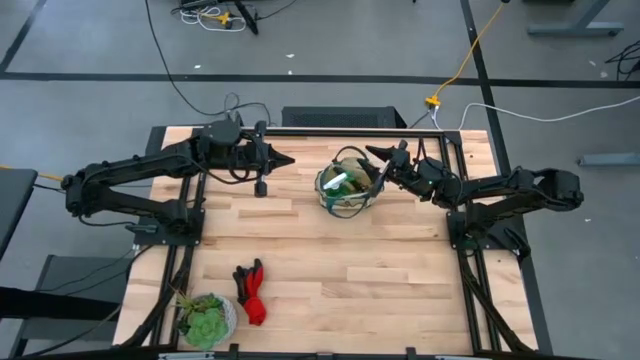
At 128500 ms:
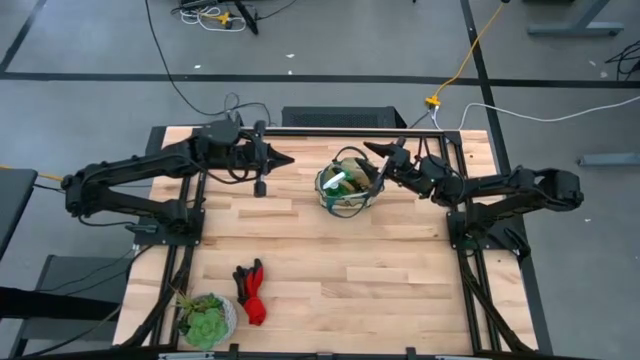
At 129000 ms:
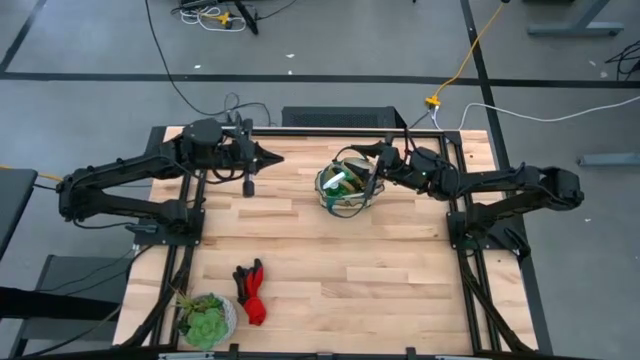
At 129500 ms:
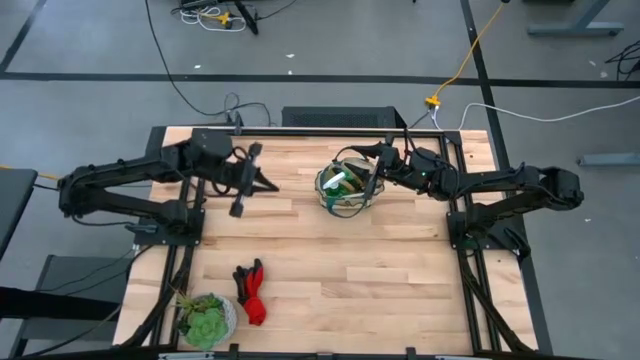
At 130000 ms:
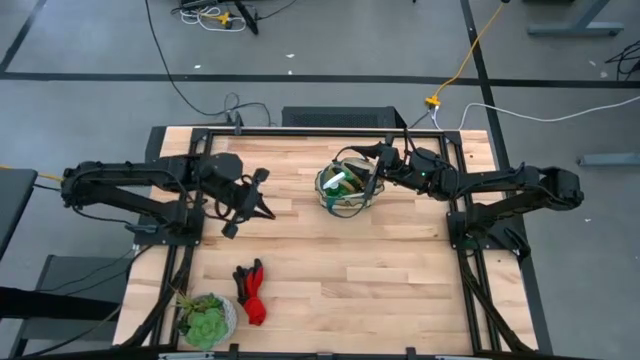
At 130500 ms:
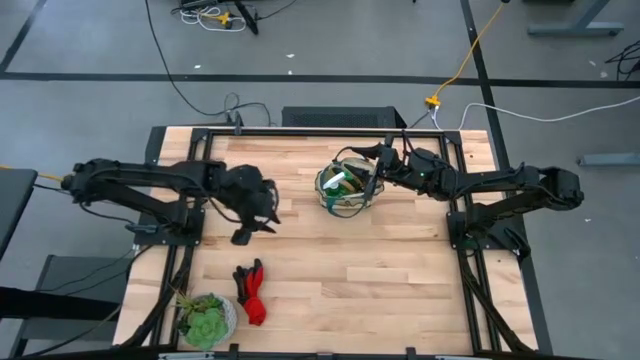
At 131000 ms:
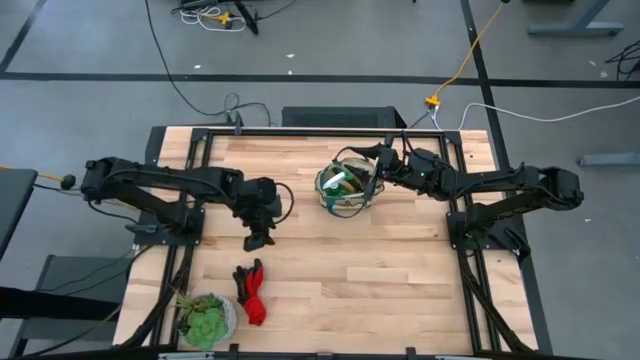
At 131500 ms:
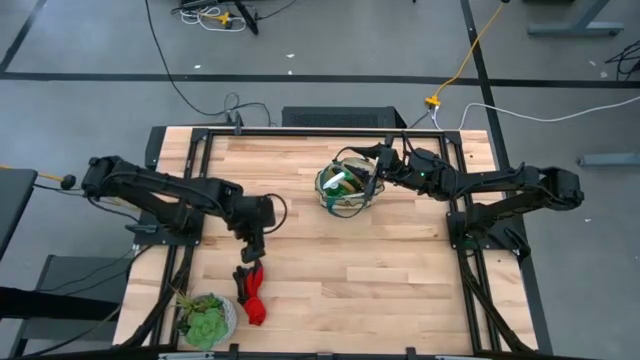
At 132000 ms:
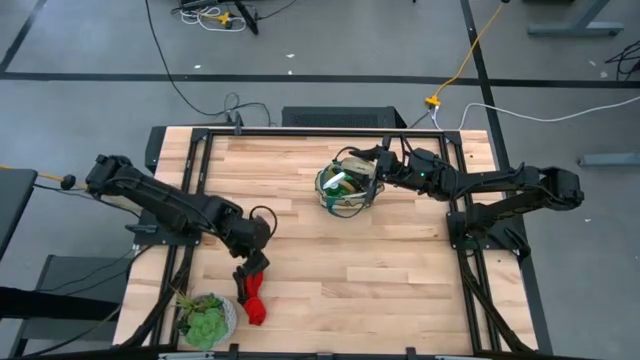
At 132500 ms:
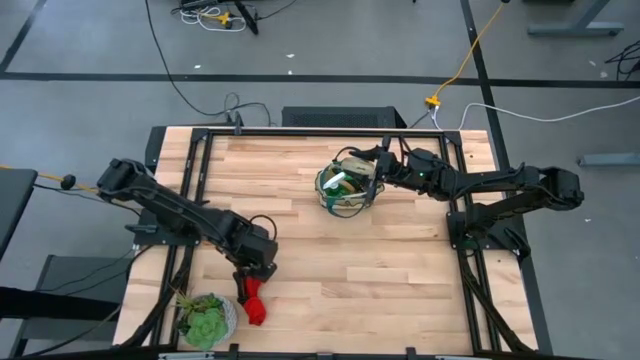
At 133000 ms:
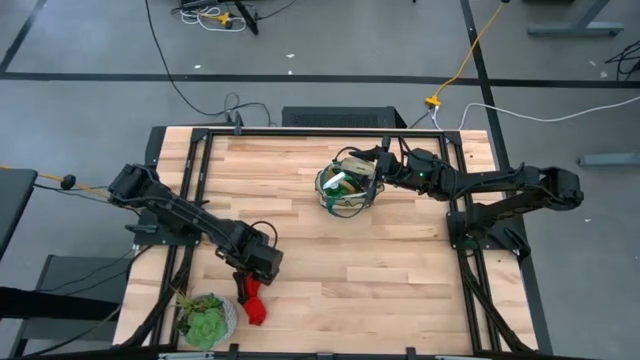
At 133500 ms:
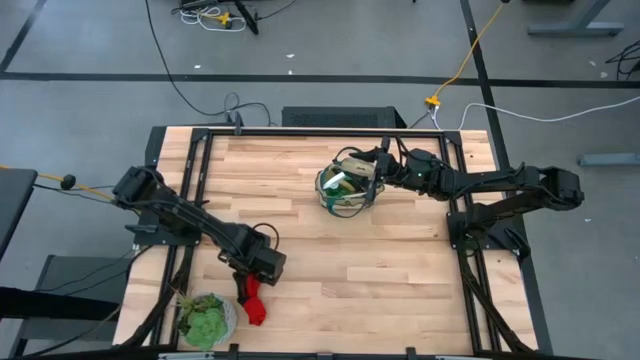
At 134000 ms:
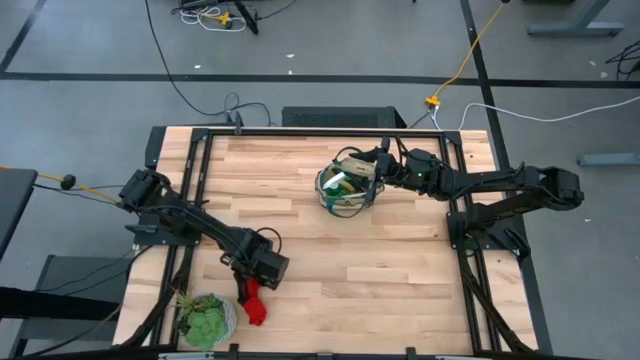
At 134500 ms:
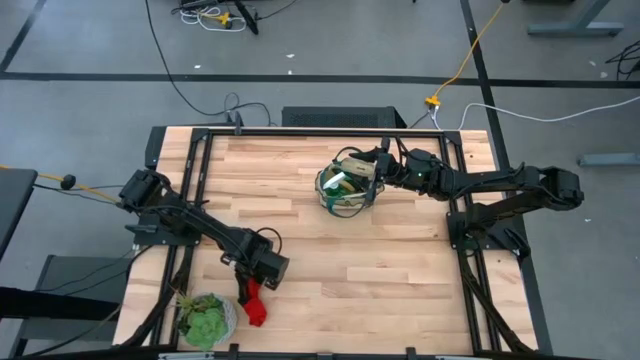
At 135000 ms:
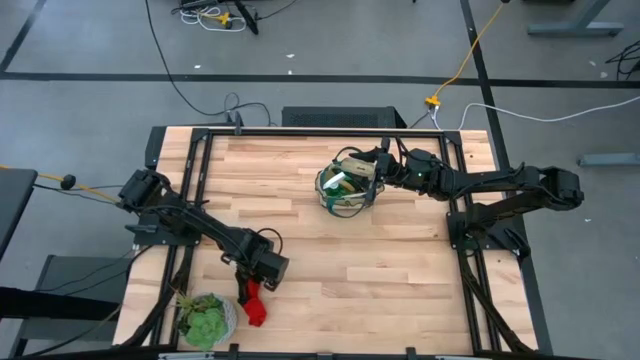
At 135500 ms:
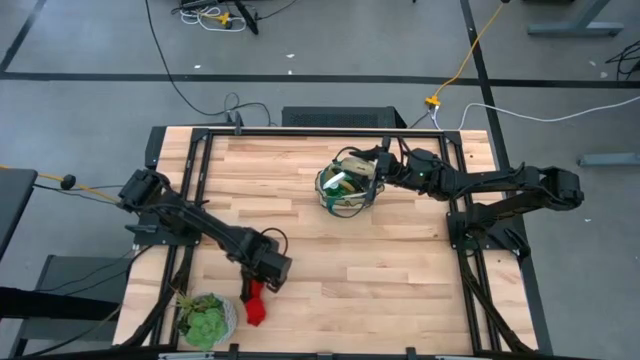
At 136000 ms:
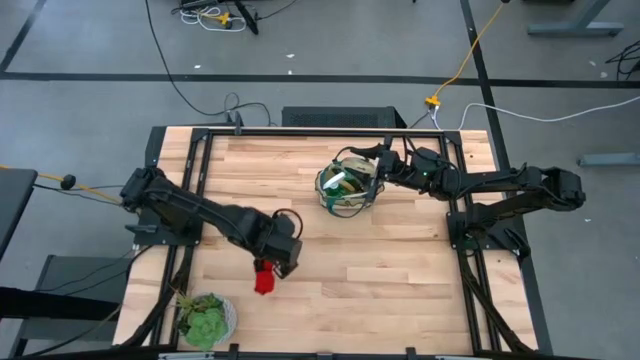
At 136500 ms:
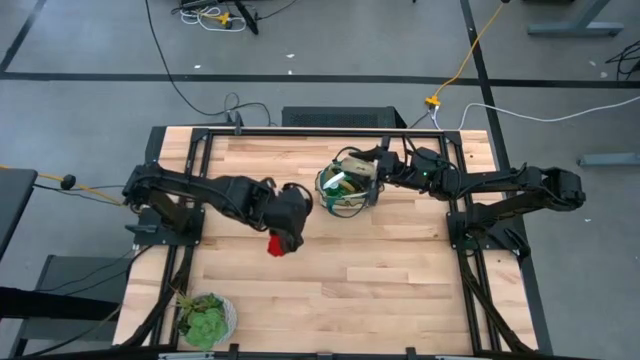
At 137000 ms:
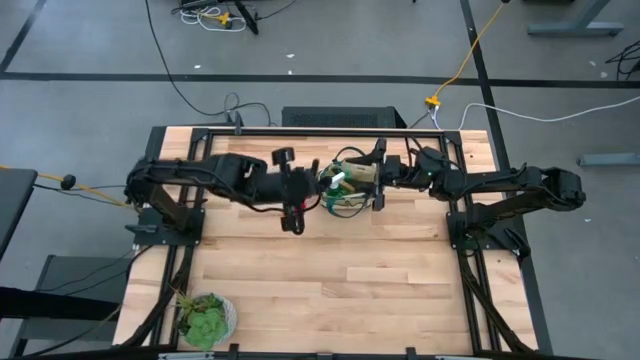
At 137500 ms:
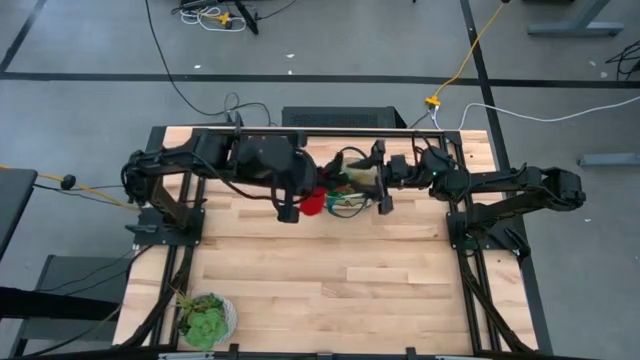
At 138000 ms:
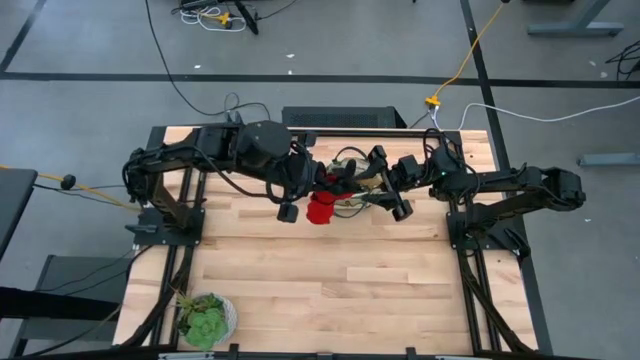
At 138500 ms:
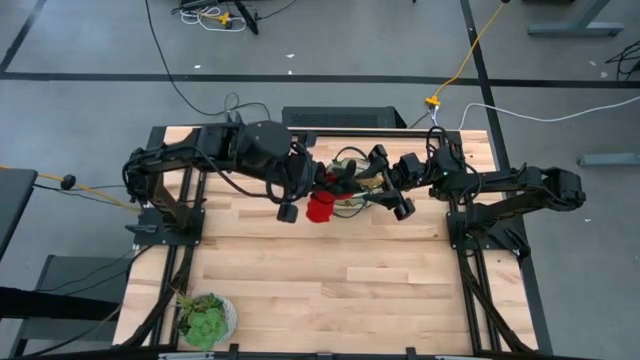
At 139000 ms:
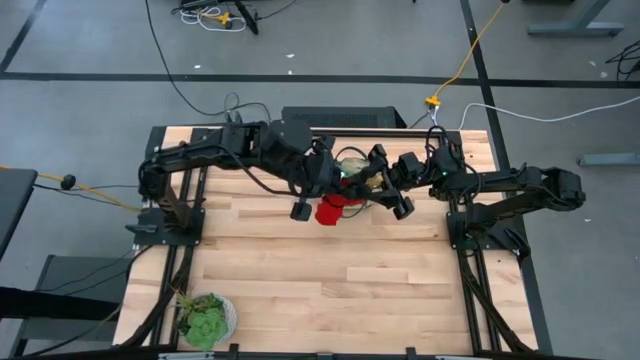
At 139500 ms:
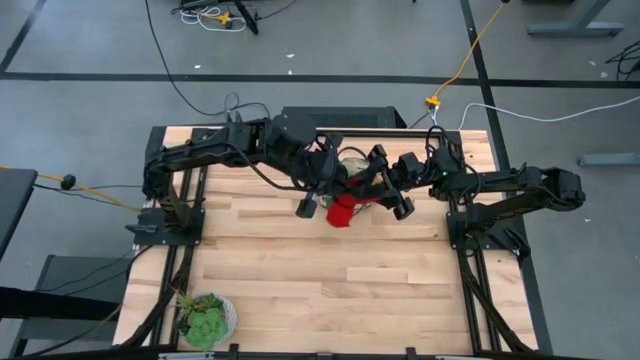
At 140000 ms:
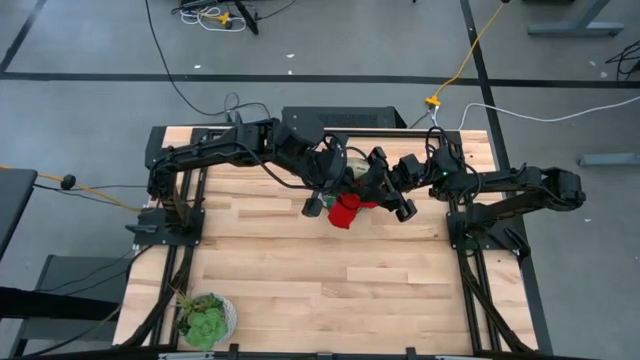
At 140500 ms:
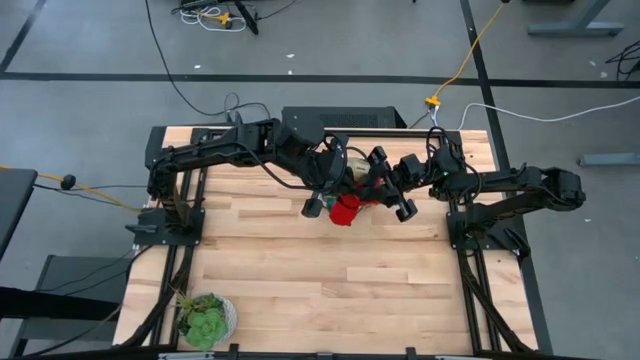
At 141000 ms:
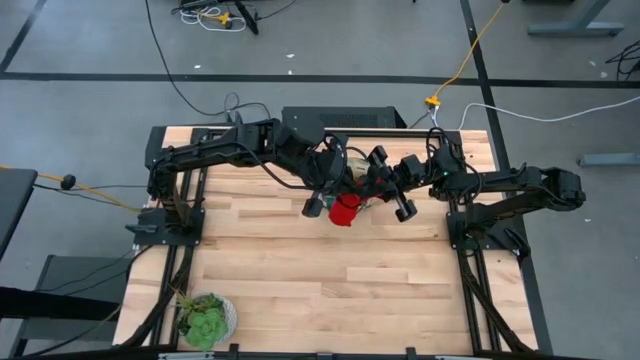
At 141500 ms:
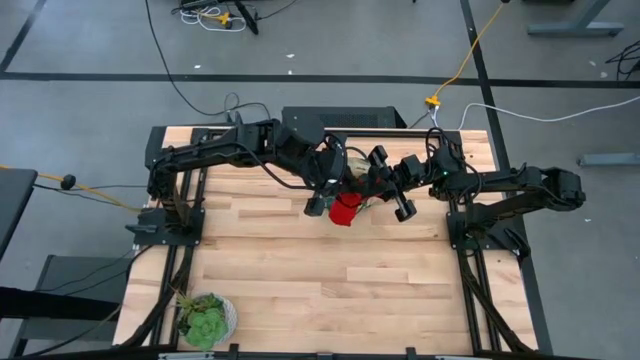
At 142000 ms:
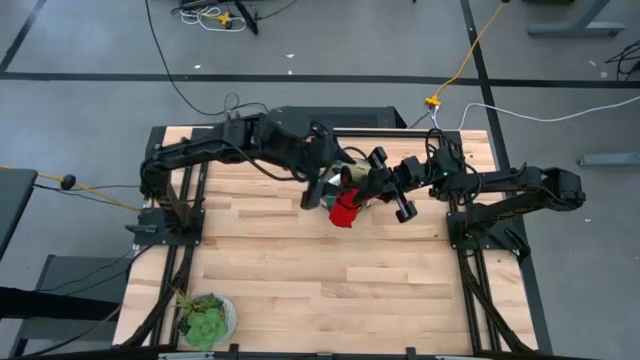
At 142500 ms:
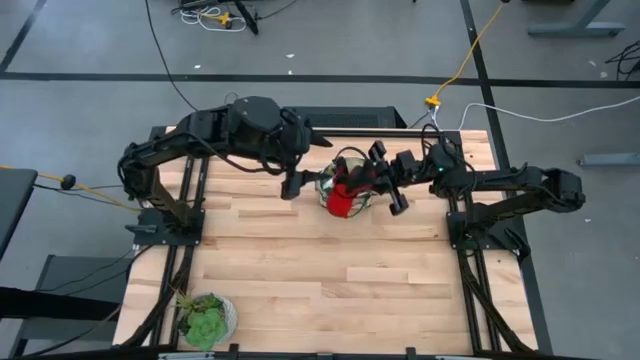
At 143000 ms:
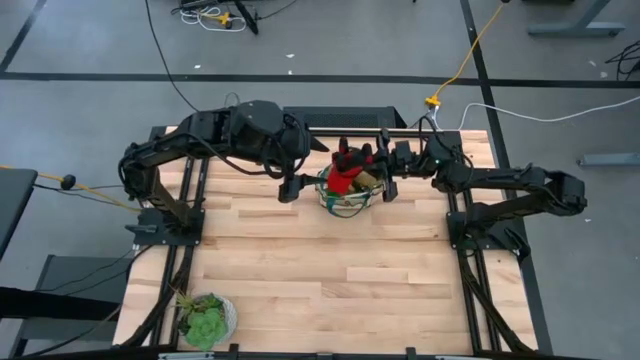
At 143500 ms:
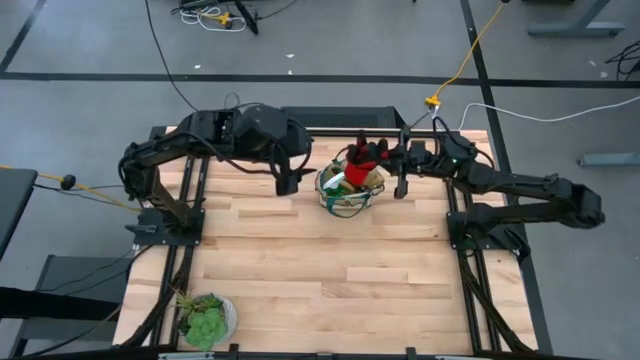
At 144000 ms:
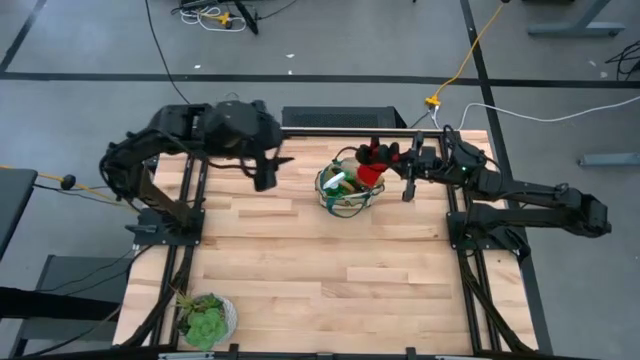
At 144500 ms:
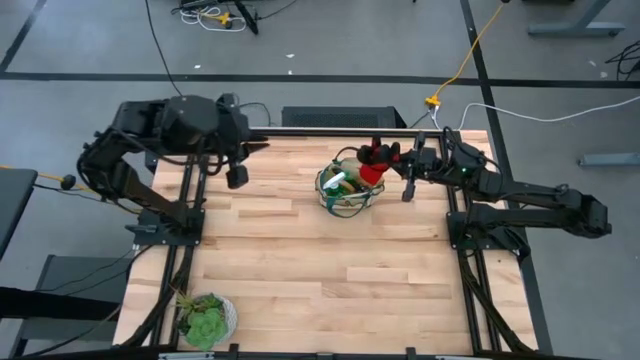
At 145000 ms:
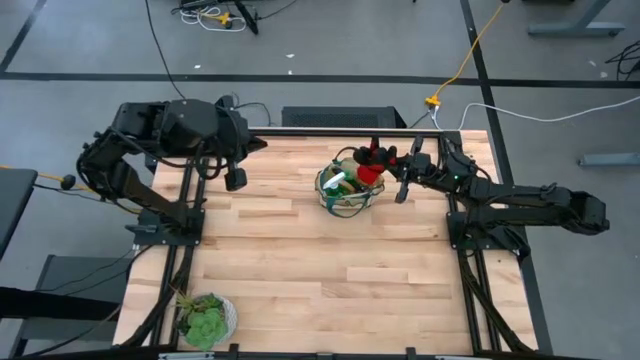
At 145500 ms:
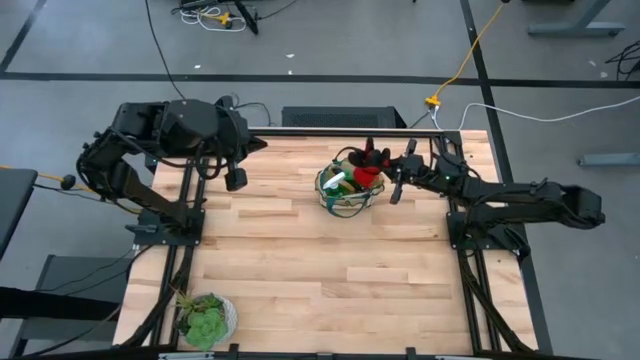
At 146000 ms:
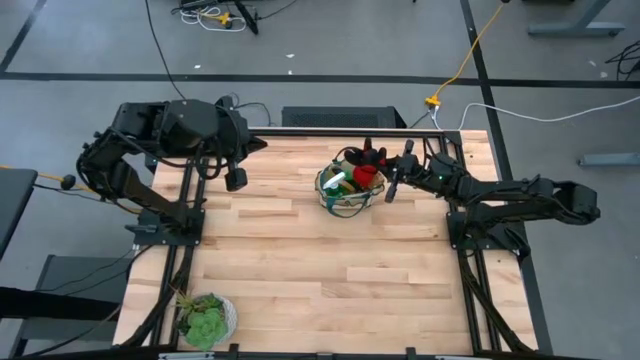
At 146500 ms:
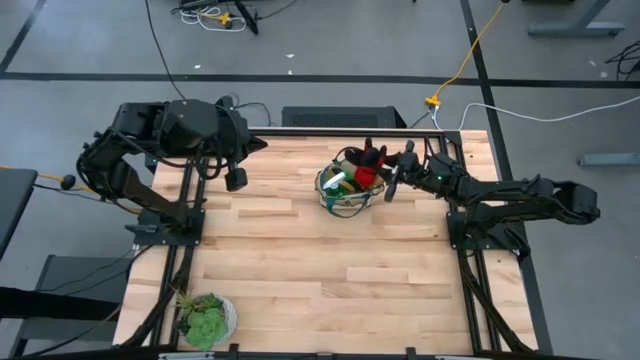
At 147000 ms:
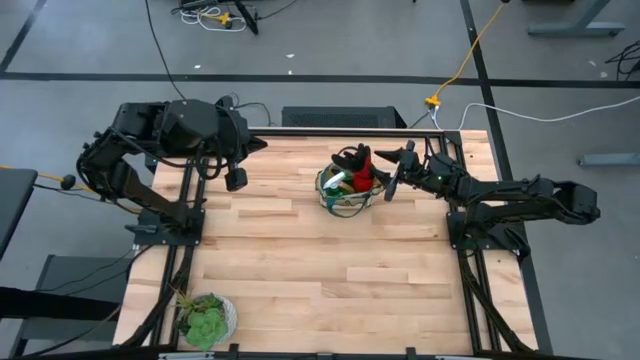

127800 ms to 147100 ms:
Task: Pick & Place Garden tools in Gardening bag
Put the red gloves into the gardening bag

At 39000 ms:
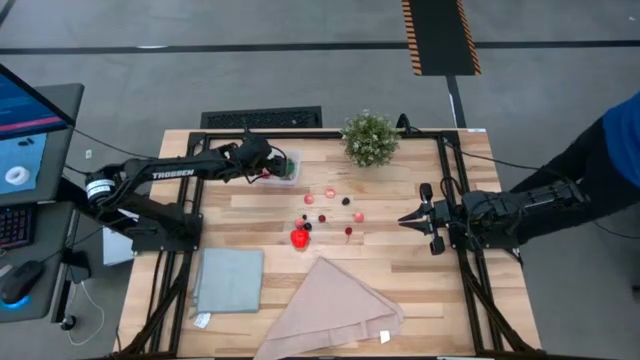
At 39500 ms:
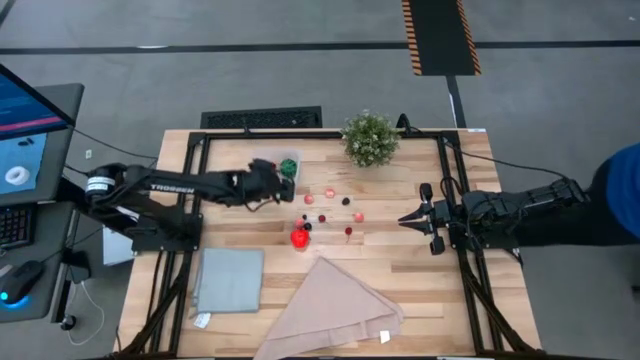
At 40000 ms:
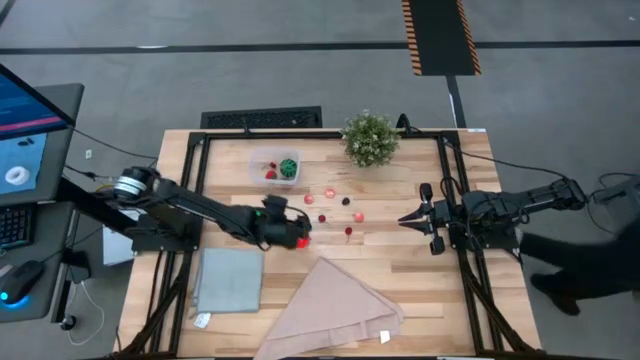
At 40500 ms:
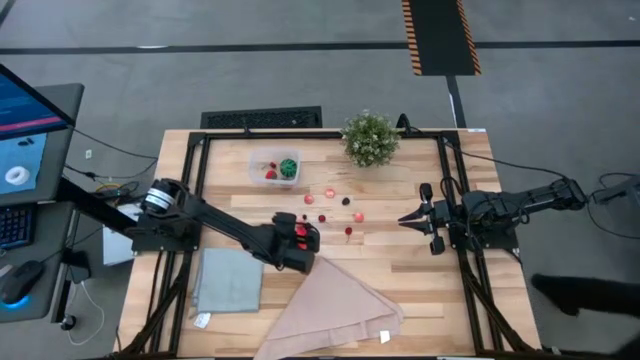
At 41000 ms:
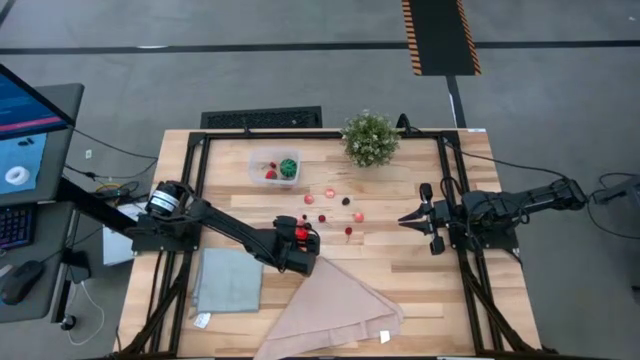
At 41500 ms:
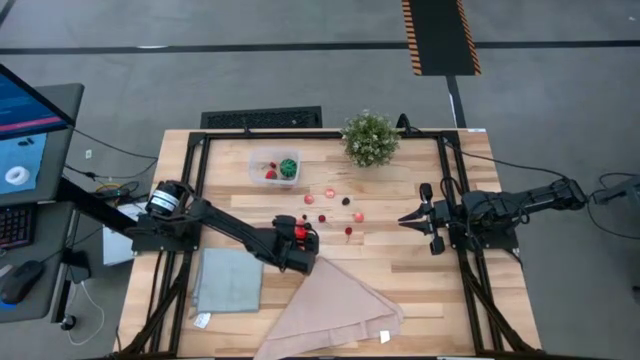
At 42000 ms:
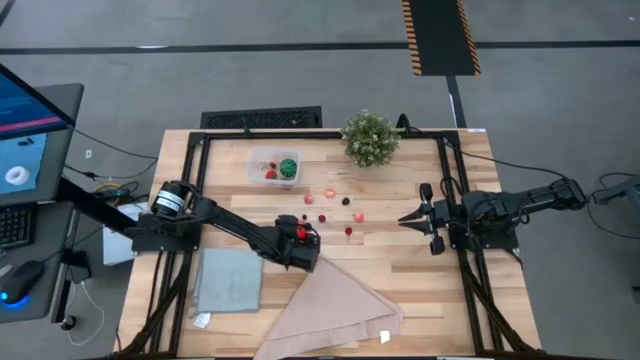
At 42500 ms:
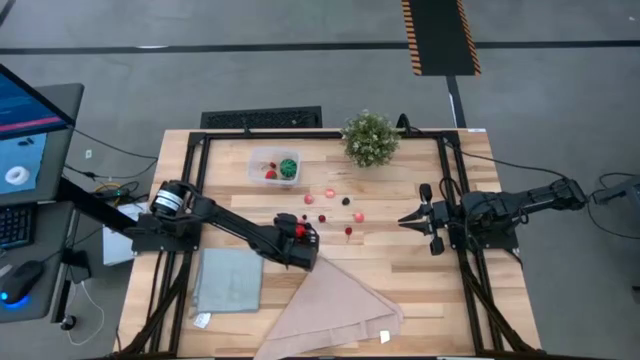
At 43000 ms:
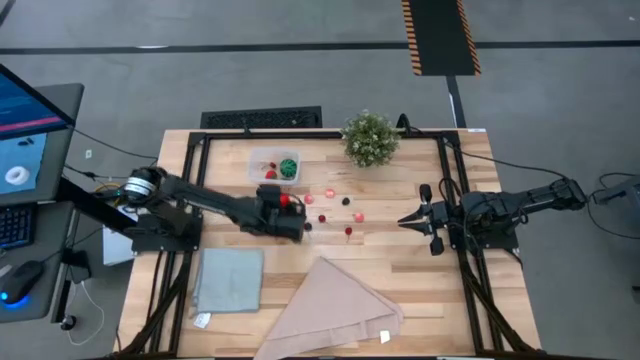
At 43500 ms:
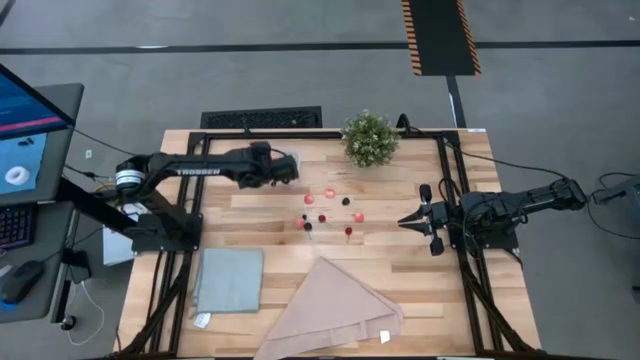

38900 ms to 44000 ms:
Task: Pick and placing Produce into tupperware
Put the red apple into the transparent container
